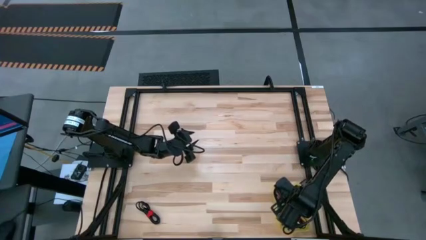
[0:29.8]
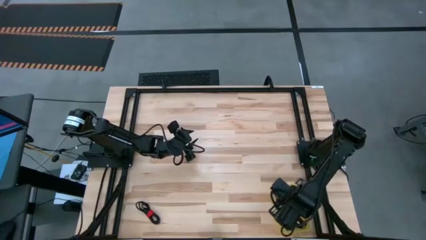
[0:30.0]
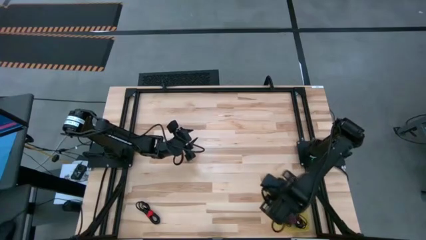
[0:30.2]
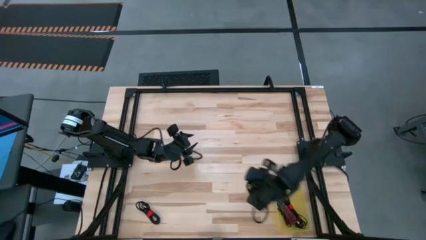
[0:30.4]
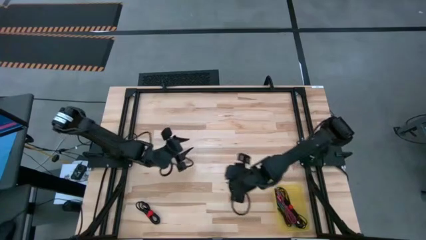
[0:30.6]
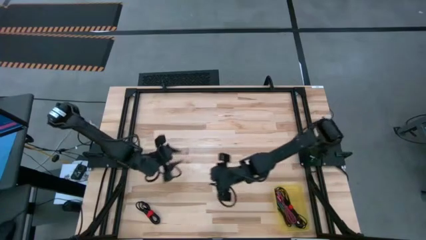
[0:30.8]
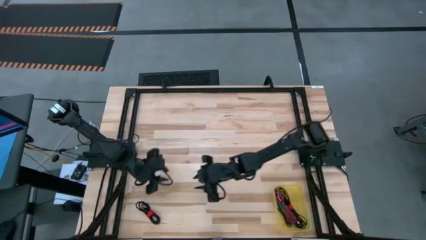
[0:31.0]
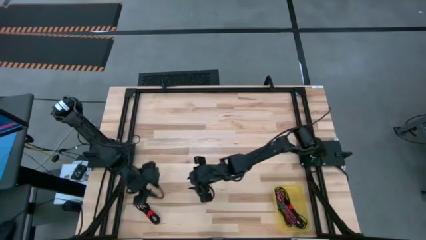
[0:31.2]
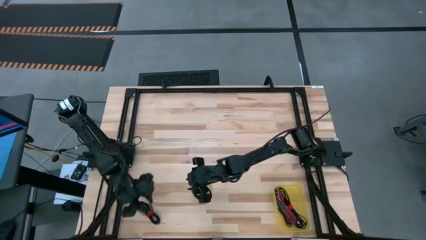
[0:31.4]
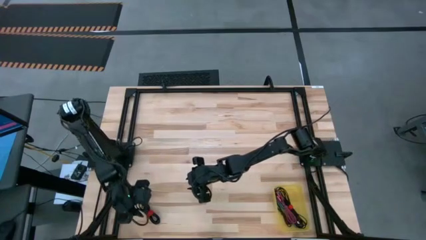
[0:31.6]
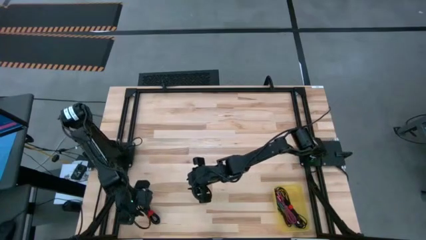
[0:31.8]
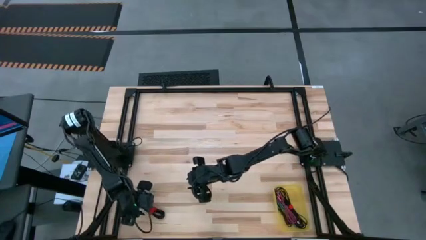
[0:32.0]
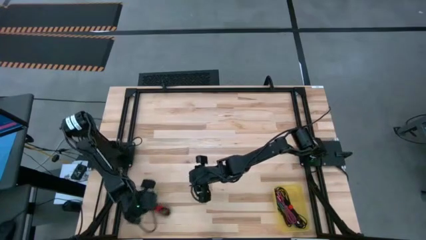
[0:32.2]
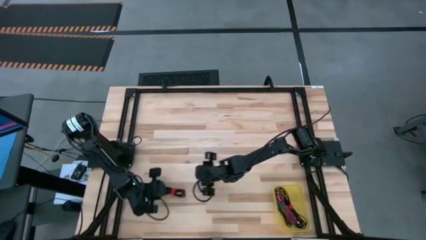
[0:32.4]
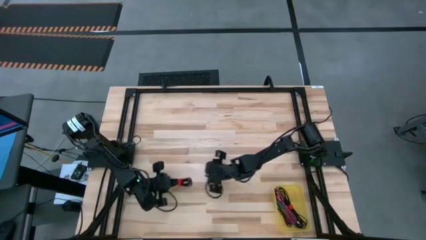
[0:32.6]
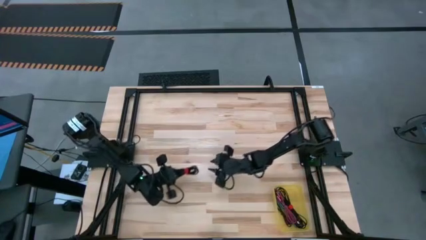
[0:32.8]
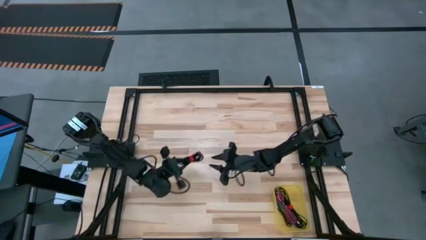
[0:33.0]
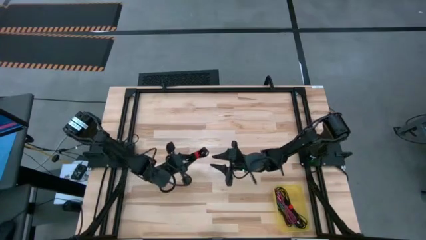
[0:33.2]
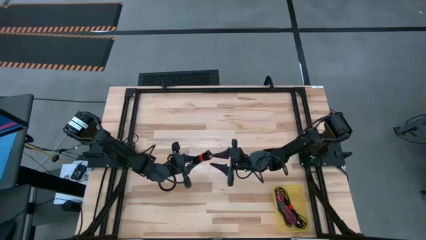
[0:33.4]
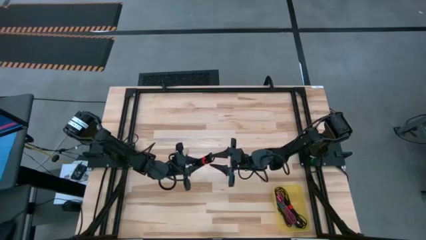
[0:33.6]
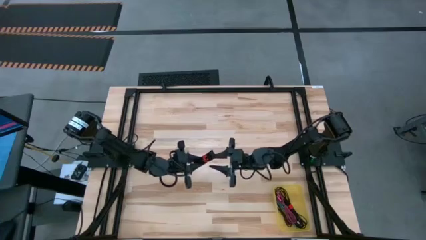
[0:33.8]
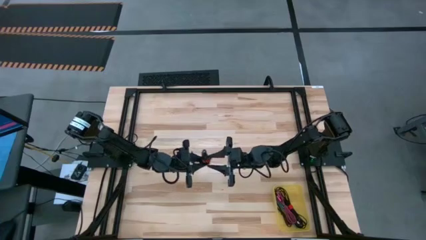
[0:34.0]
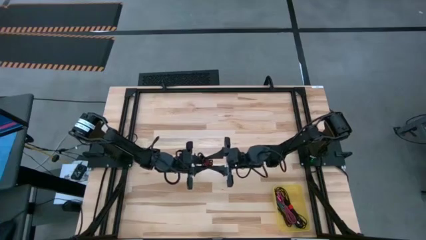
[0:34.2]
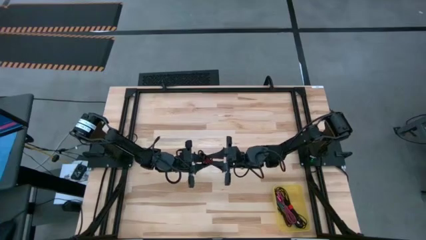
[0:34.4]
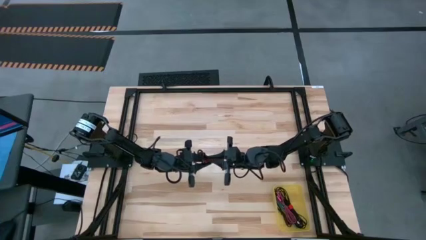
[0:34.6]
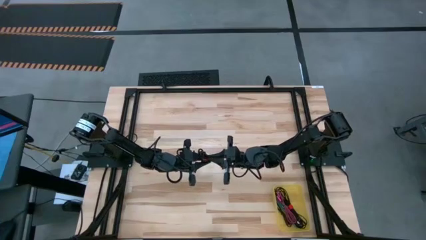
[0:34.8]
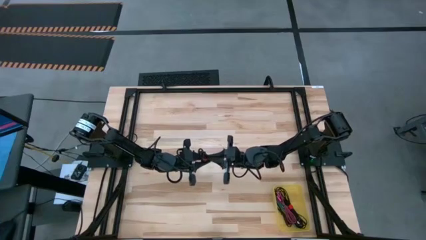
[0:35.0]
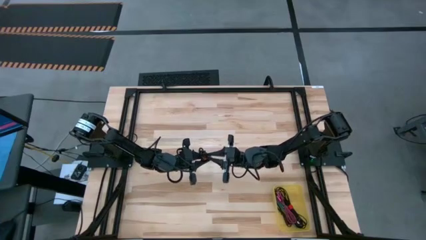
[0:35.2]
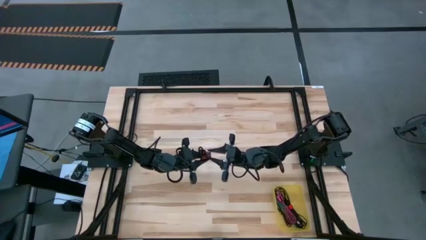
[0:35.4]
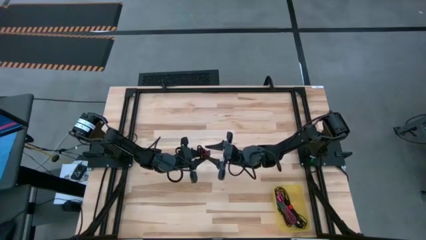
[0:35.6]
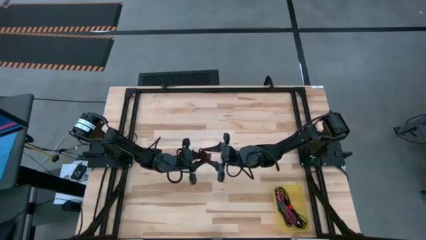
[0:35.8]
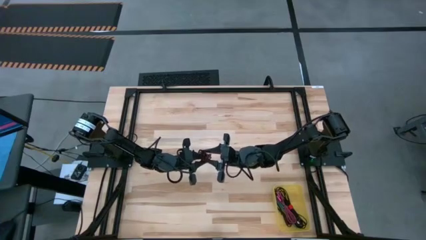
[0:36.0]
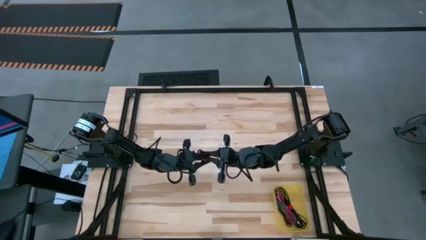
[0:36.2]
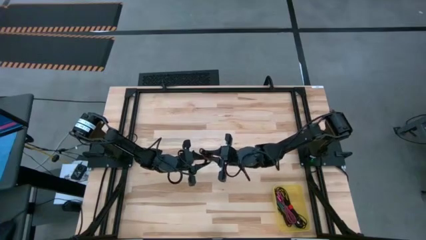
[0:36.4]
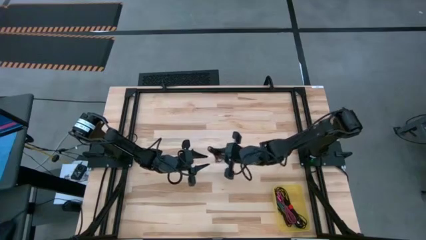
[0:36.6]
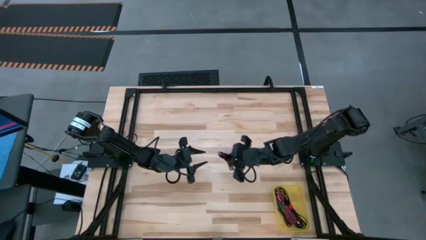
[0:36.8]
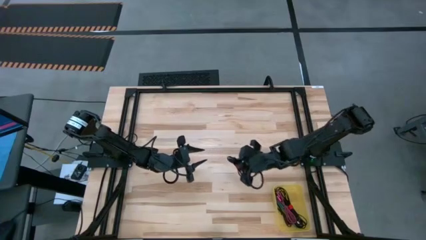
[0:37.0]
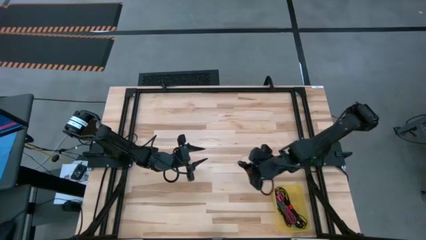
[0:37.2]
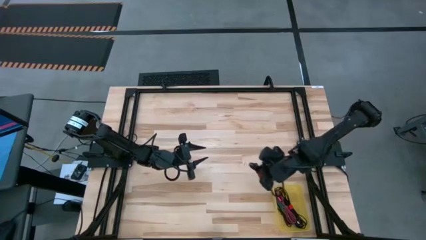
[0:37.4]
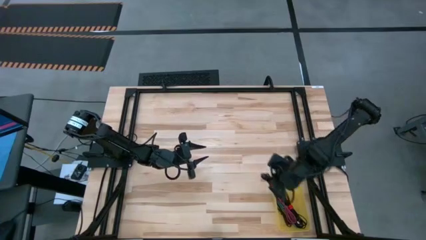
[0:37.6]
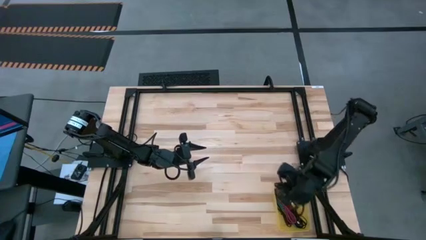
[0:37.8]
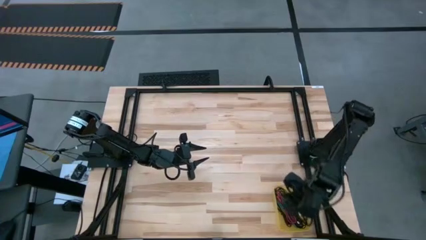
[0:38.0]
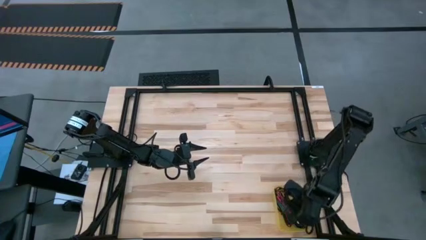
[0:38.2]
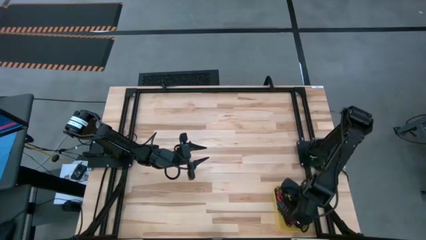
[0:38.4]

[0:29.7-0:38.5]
Task: Pick and place USB-C Cables
Put the black cable charger into the yellow bin

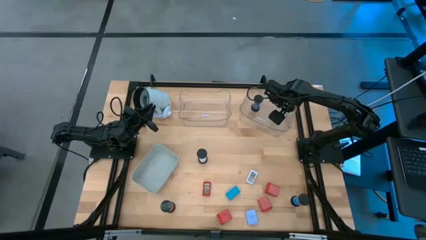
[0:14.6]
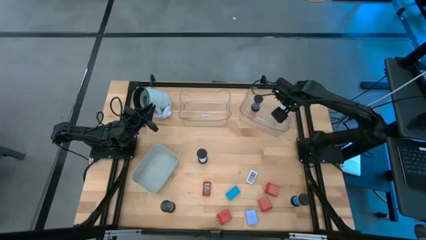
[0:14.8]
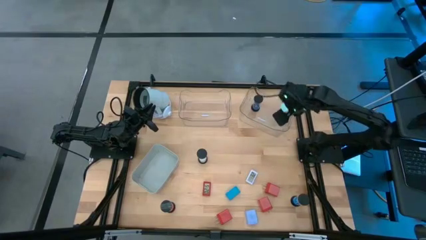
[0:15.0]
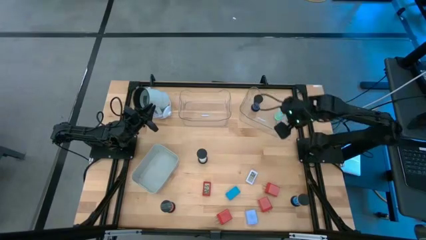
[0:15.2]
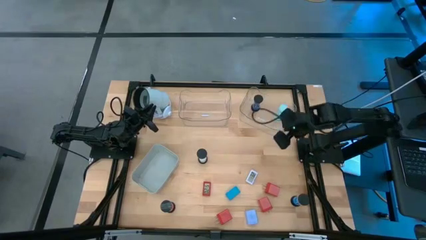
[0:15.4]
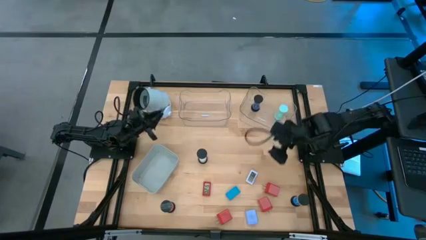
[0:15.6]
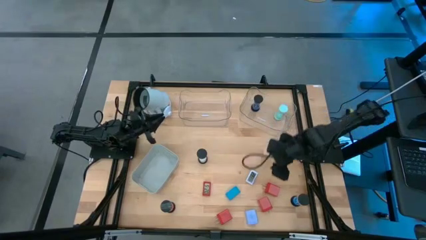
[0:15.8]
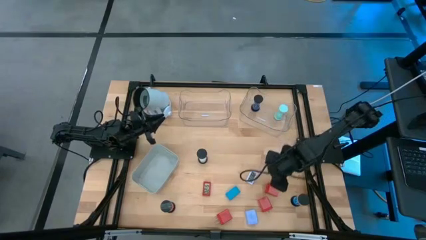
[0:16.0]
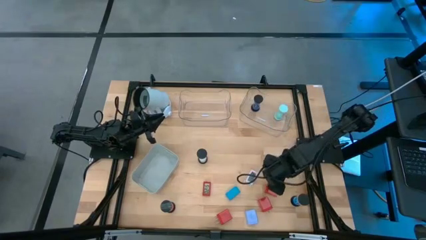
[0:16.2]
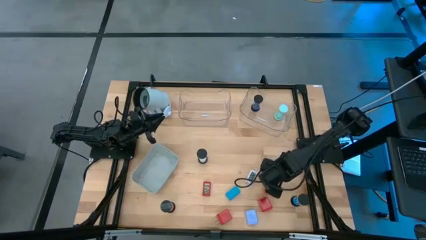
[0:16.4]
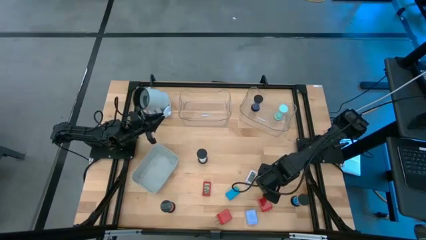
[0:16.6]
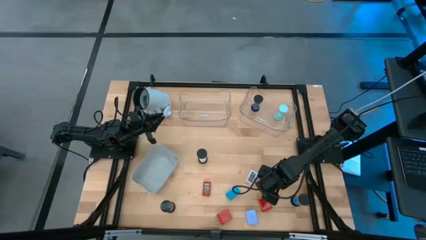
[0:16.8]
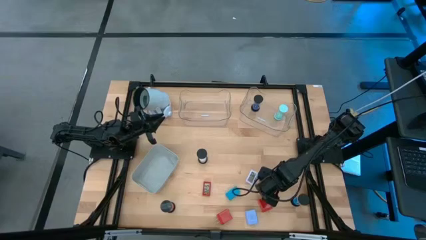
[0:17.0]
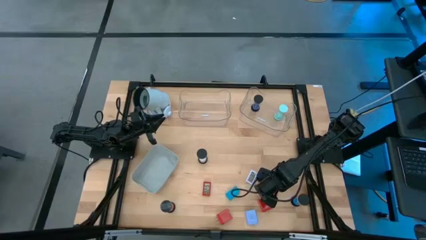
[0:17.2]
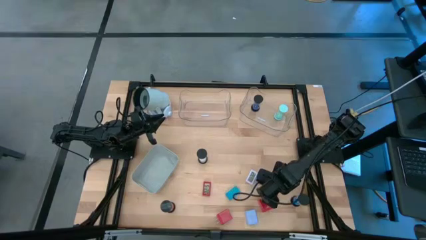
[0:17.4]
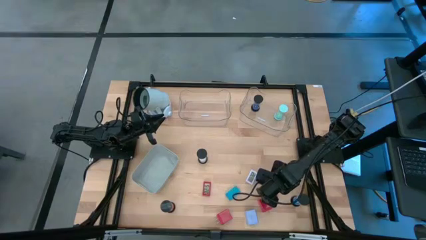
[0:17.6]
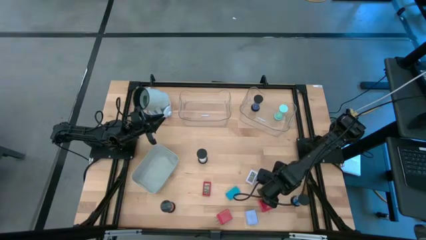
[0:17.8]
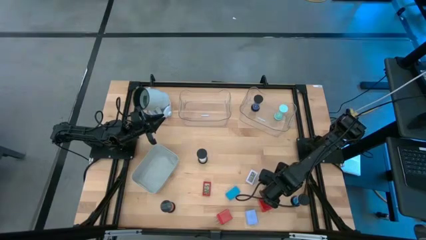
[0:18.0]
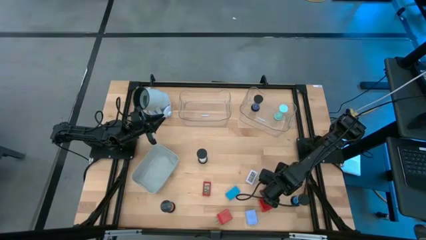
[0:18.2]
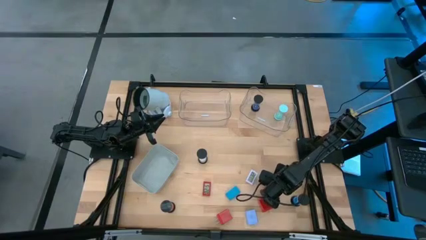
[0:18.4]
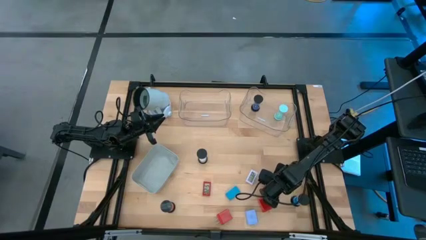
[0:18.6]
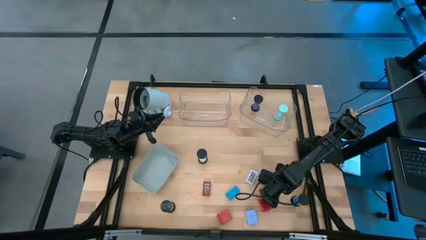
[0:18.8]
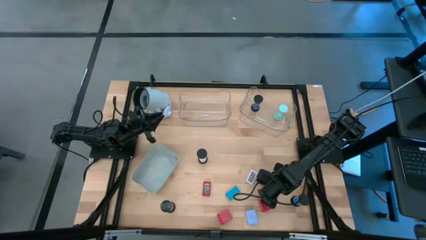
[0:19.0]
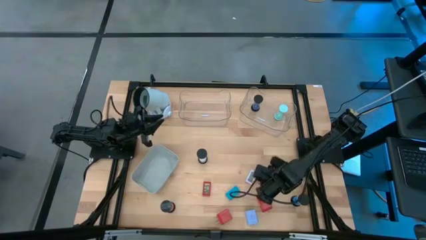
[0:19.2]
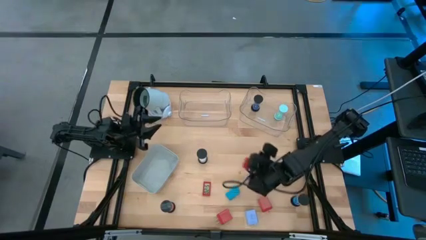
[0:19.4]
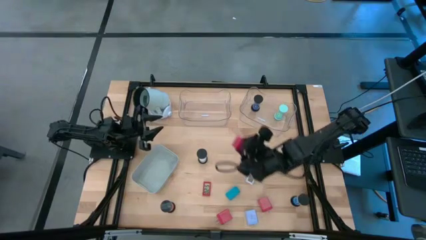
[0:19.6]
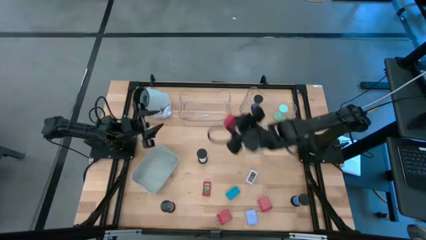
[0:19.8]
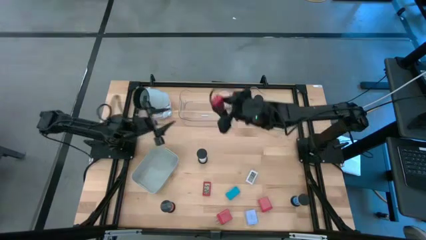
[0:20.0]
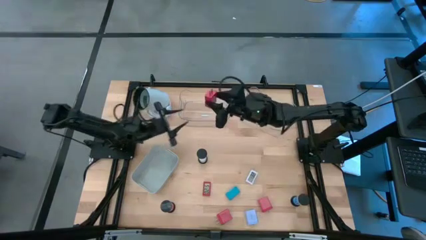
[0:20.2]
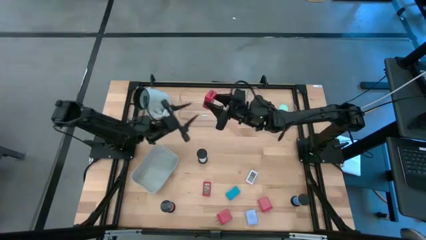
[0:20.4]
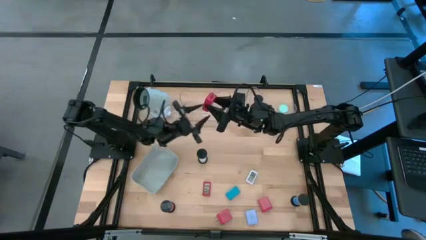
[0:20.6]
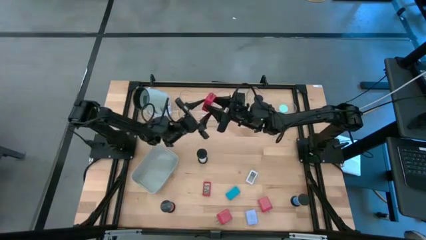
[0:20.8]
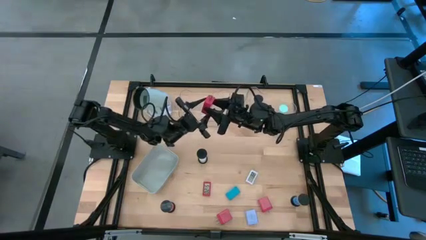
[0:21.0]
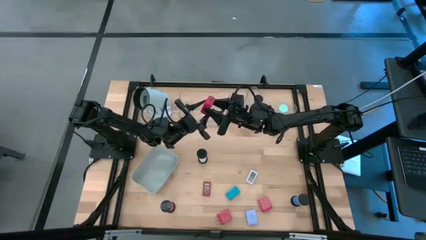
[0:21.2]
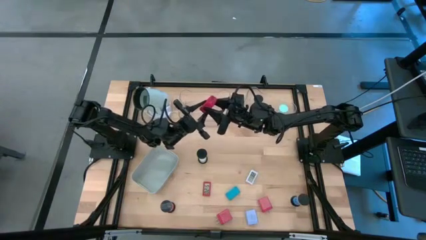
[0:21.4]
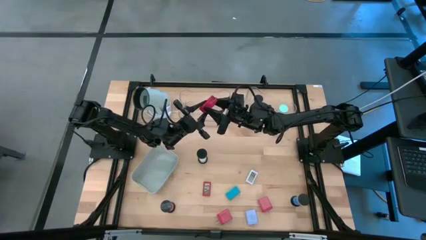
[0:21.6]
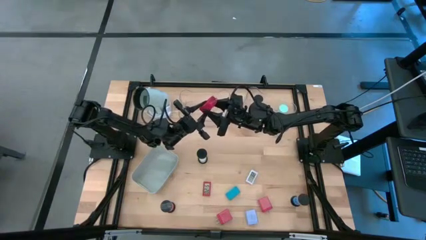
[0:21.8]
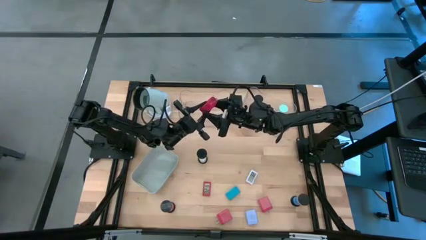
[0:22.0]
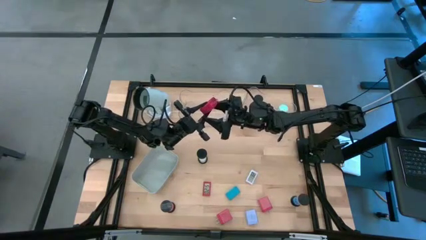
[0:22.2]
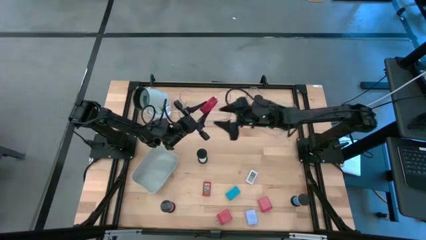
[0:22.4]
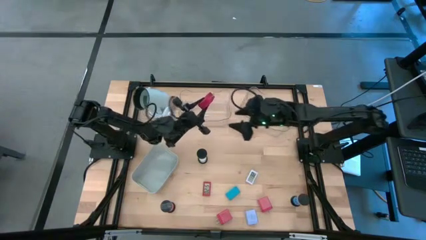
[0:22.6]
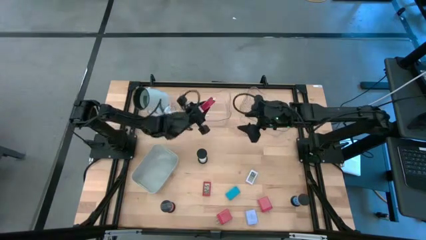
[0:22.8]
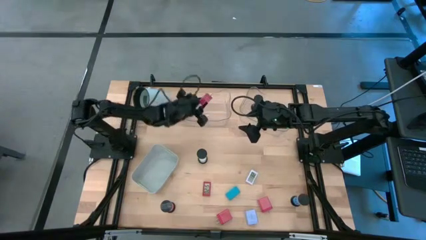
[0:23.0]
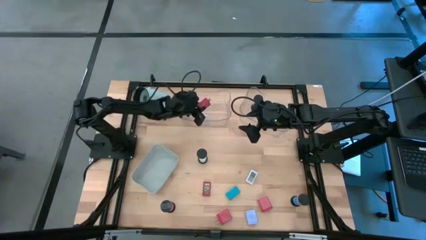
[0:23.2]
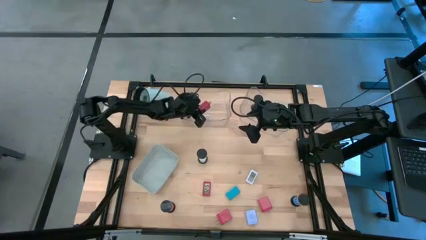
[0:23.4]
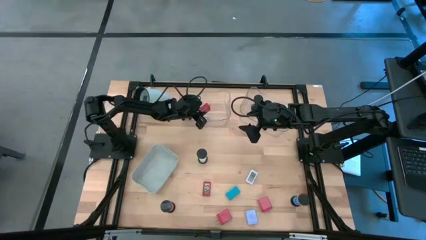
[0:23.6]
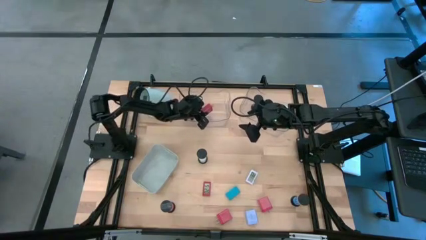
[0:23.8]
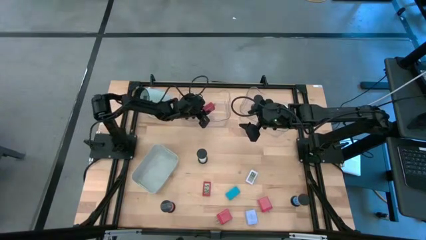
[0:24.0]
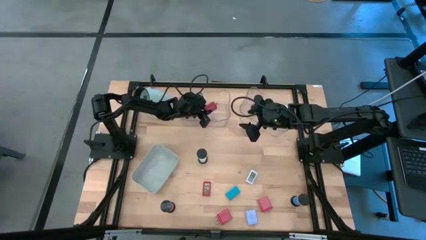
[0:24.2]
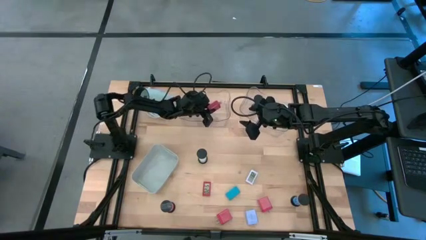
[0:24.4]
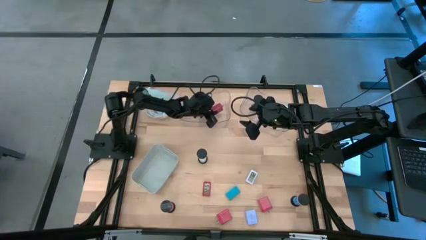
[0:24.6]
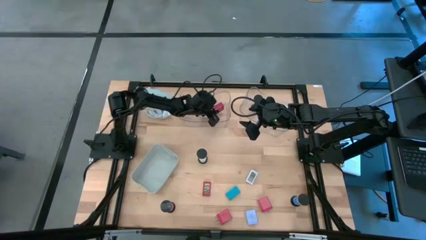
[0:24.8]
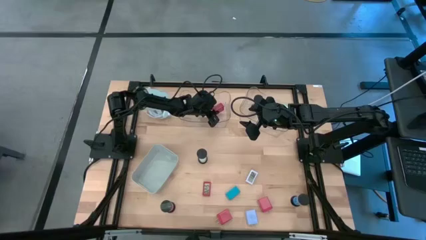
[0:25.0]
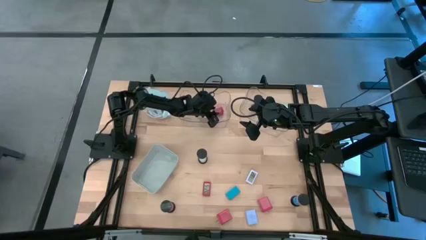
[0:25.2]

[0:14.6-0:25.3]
Task: Pick & Place Office items
Put the top right red charger adapter into the left transparent bin
